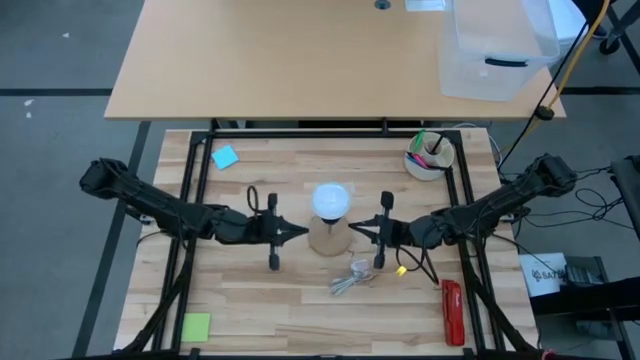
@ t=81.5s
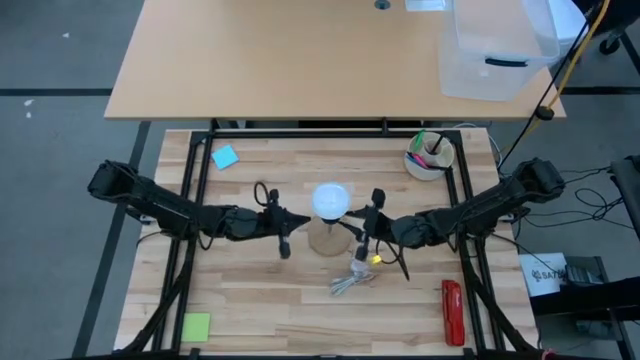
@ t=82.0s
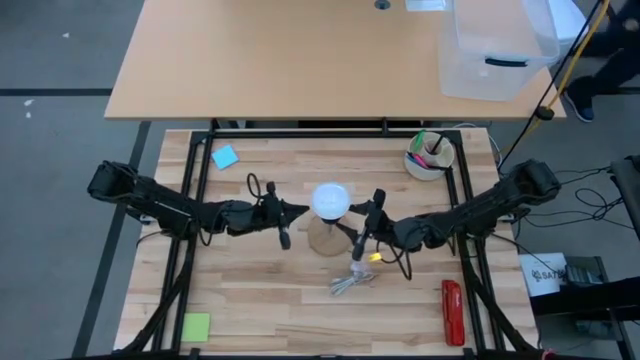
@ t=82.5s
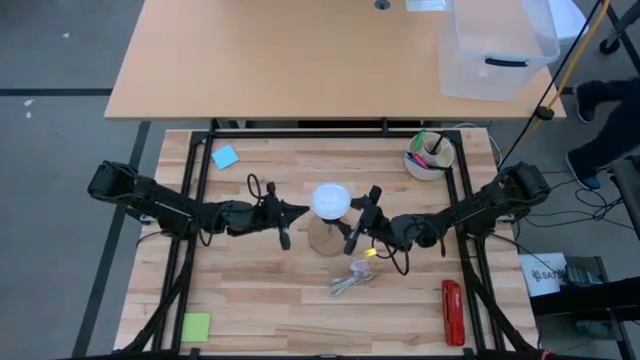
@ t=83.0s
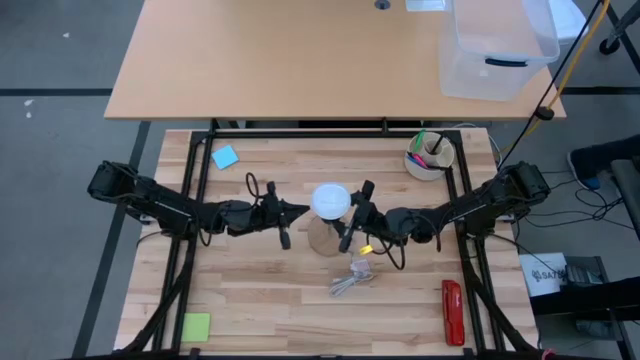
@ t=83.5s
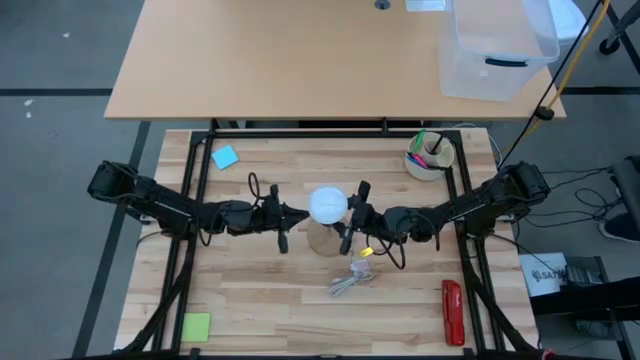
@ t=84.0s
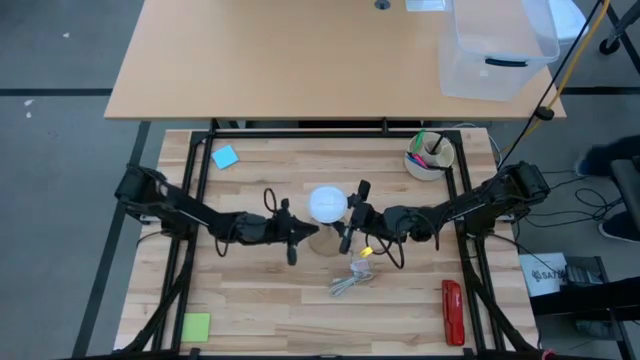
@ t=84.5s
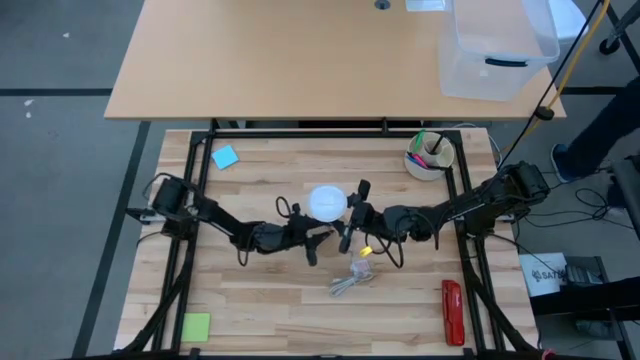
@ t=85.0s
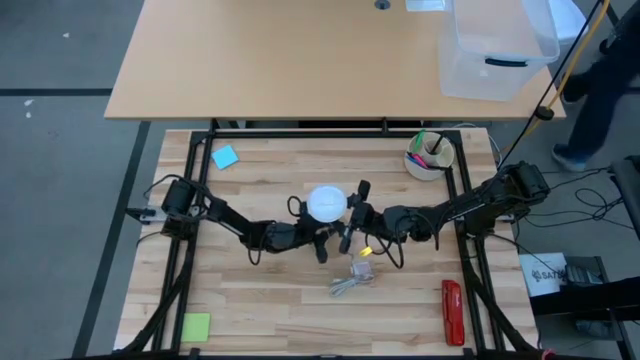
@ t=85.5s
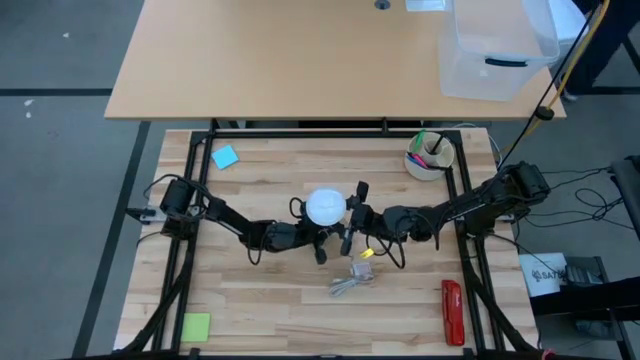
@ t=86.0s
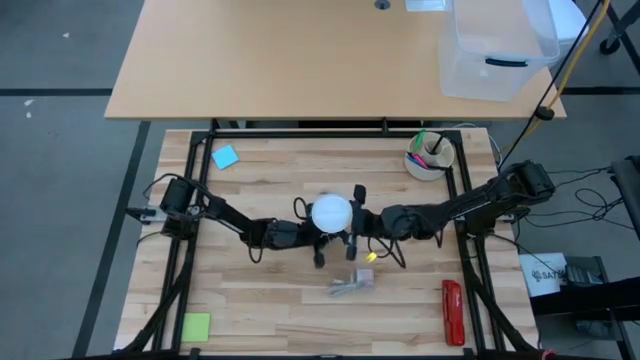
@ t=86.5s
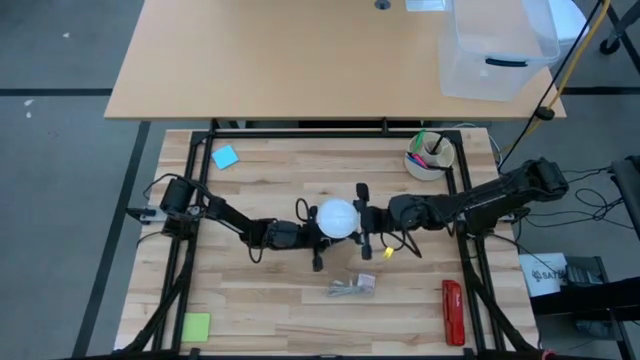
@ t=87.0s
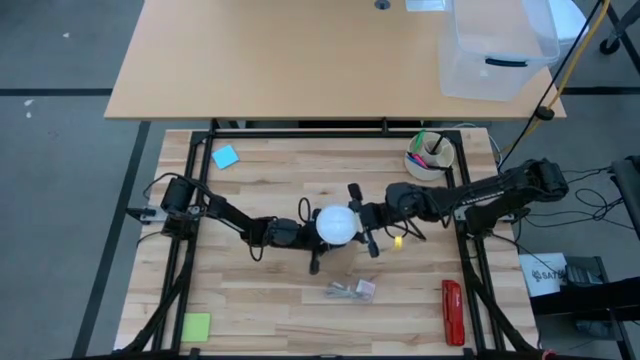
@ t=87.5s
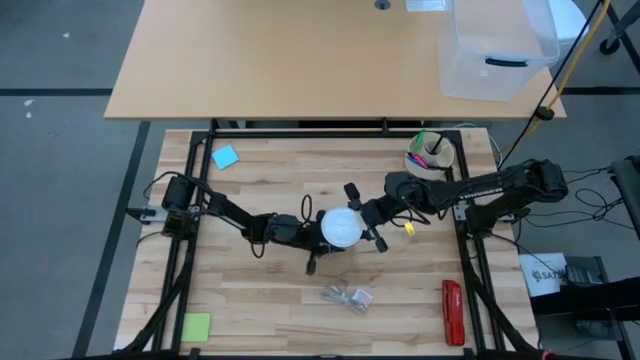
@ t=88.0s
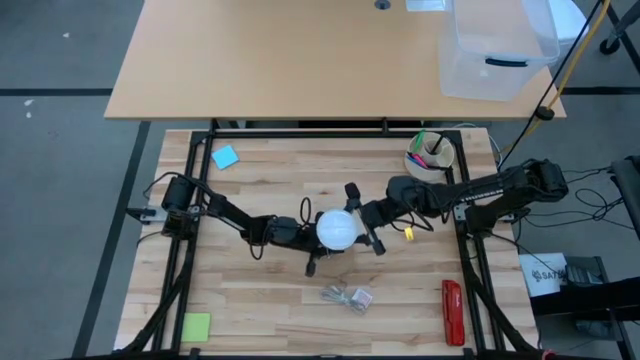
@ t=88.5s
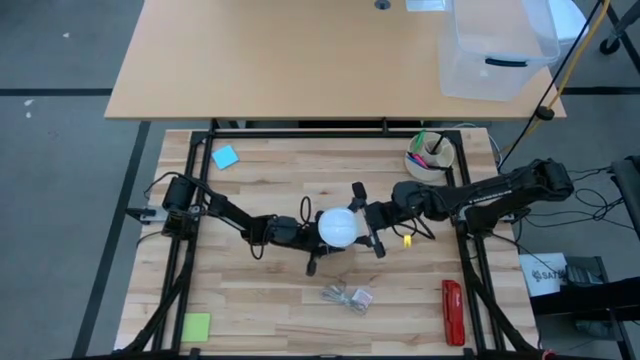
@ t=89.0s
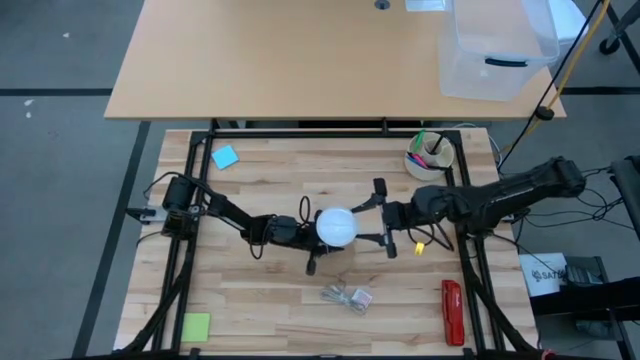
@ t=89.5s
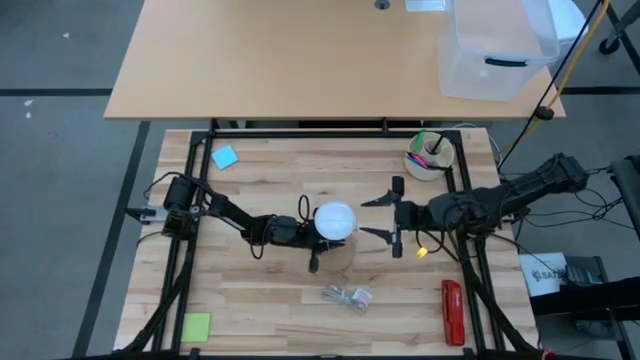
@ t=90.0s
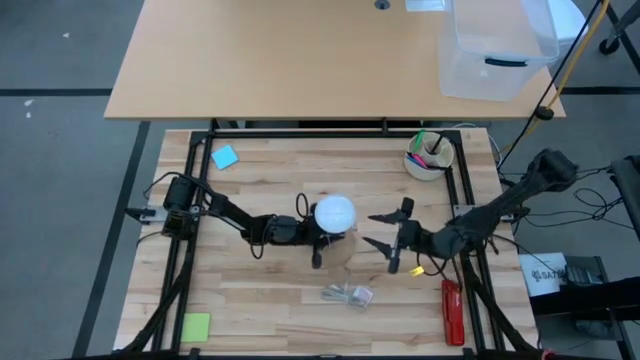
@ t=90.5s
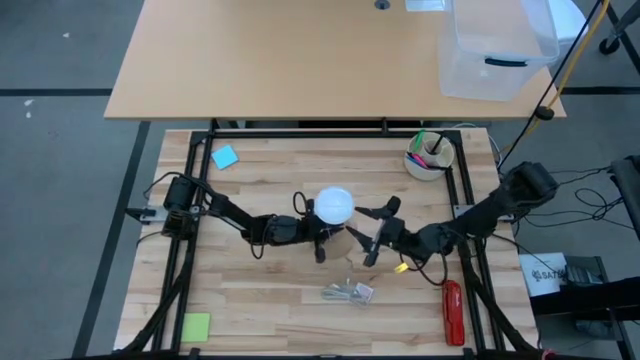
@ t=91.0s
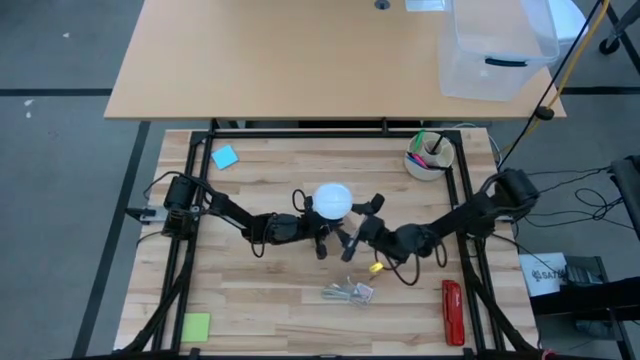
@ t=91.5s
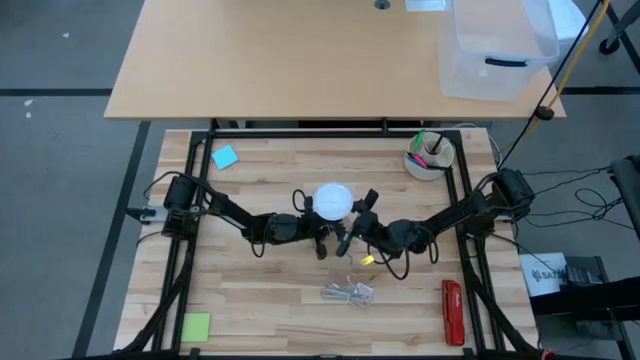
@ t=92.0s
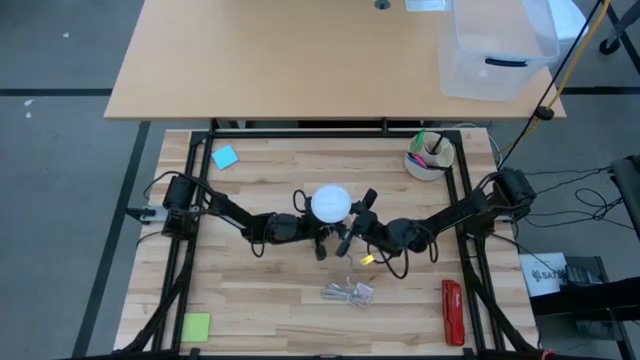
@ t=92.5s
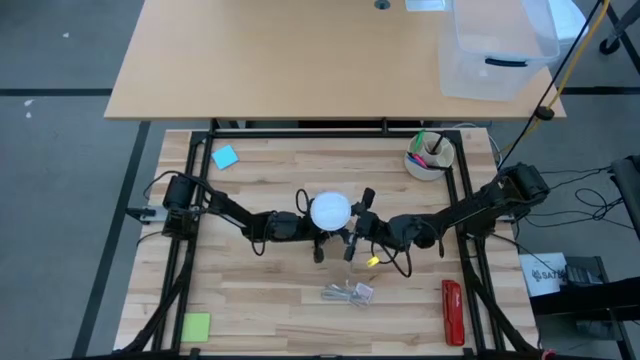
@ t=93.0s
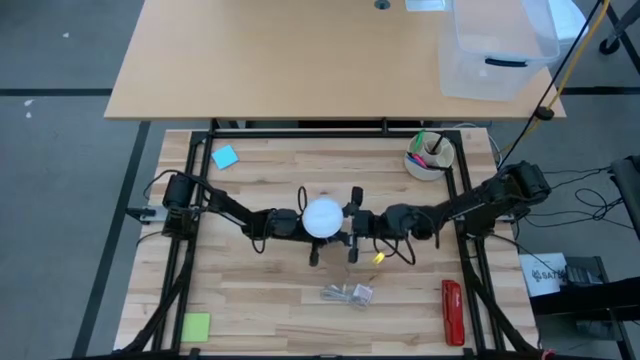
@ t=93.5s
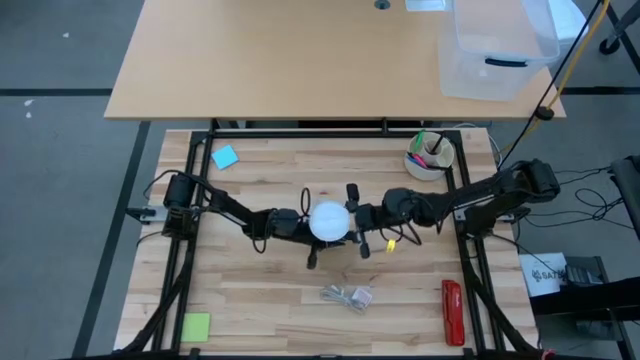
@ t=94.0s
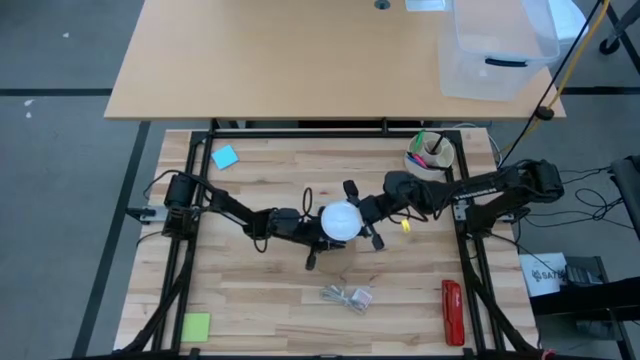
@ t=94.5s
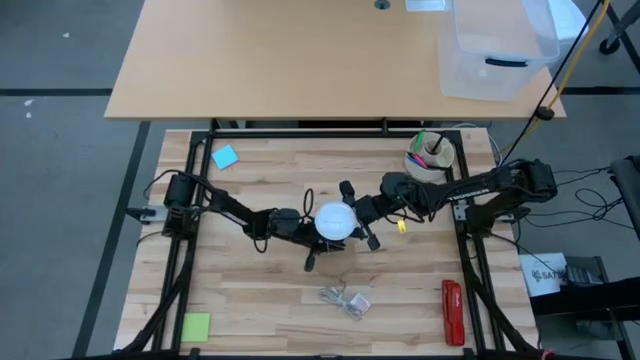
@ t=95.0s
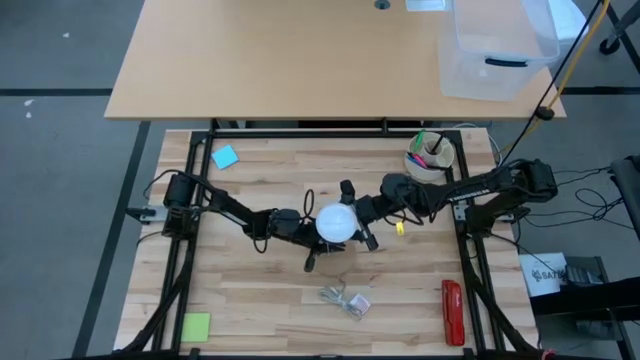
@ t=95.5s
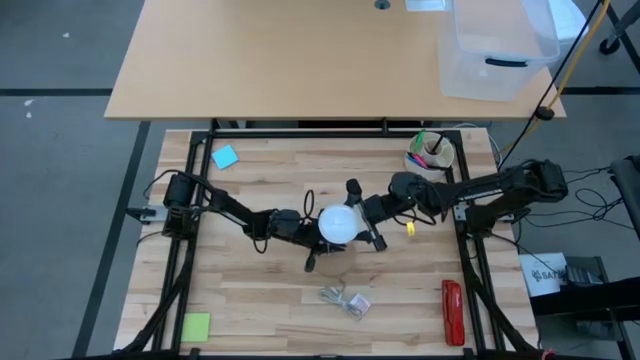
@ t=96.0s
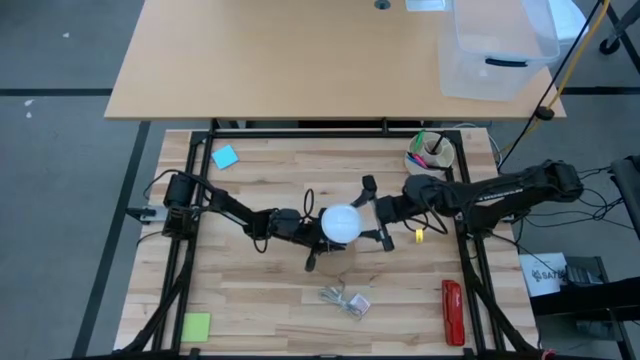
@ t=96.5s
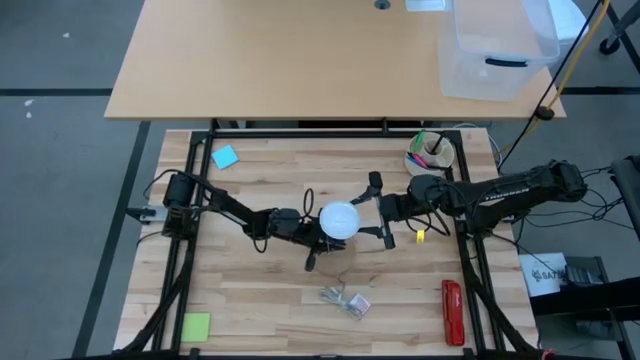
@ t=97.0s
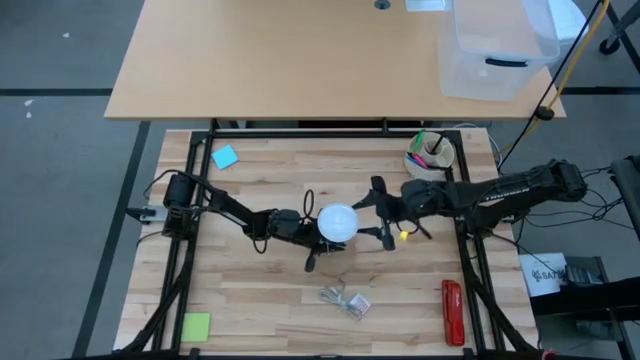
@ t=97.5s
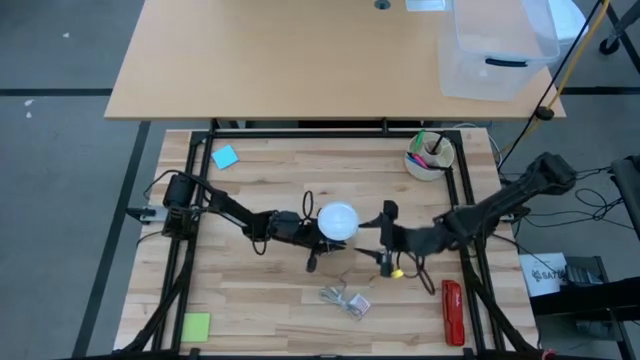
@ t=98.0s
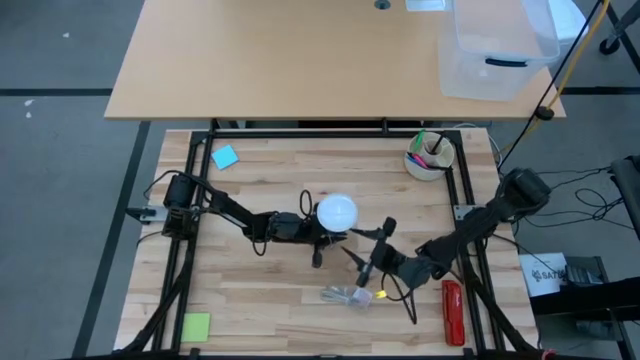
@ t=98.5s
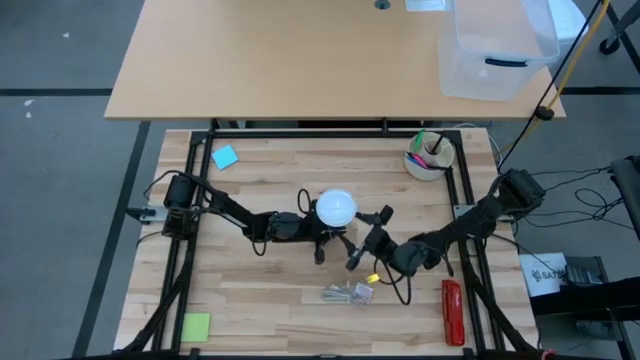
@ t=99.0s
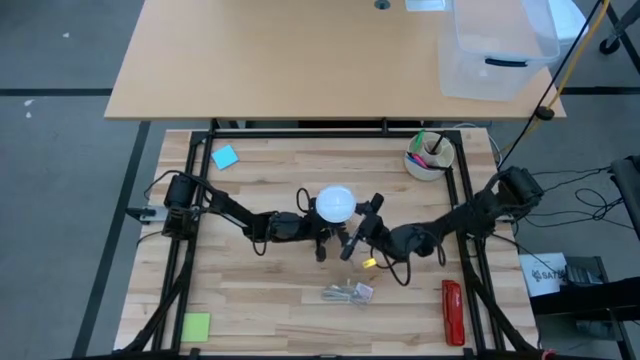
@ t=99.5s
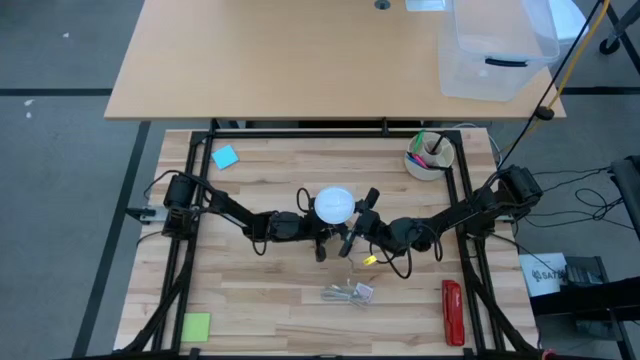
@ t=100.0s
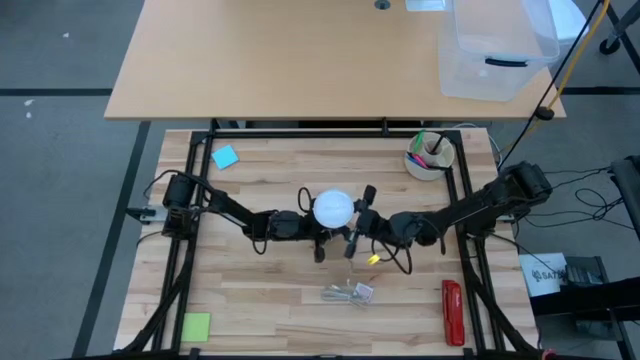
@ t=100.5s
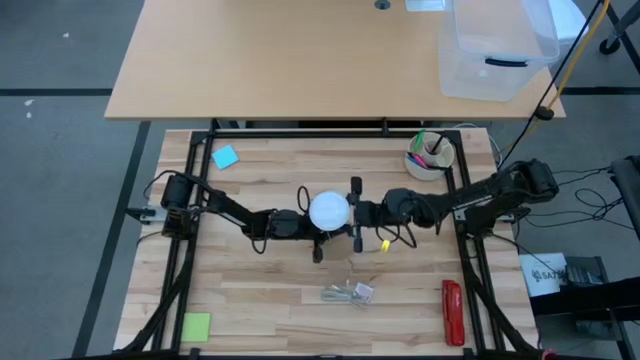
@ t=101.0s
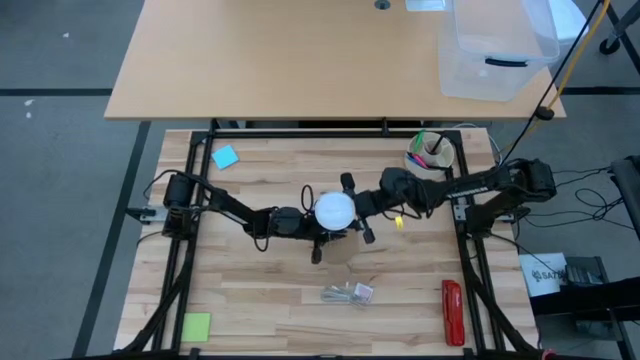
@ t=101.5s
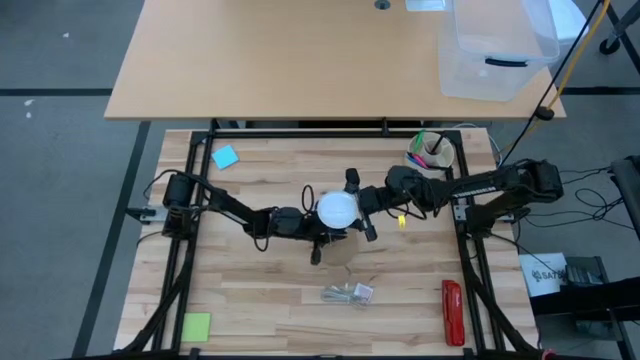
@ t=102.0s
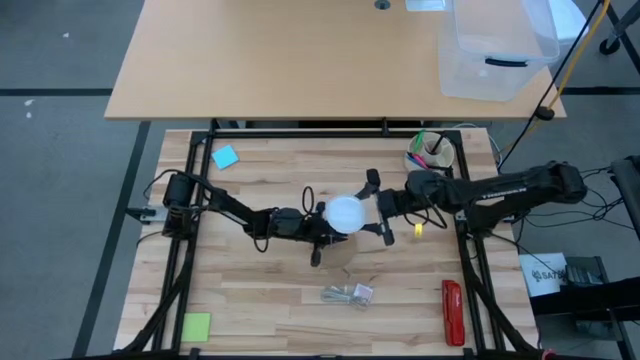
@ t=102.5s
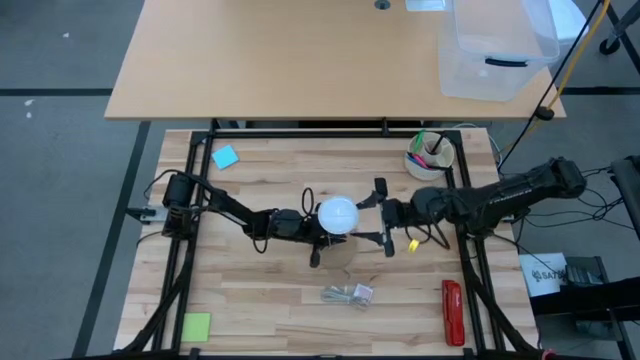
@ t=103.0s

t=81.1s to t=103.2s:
Task: Screw lightbulb
Remove the lightbulb from the lamp
